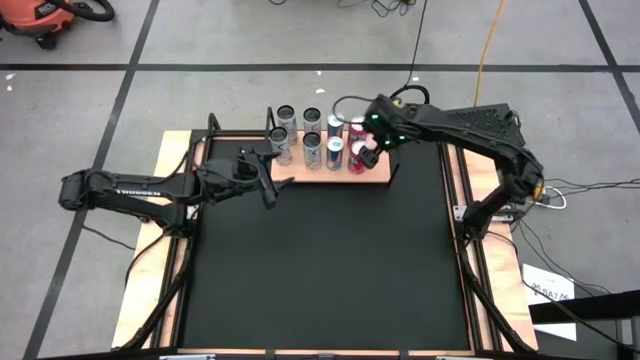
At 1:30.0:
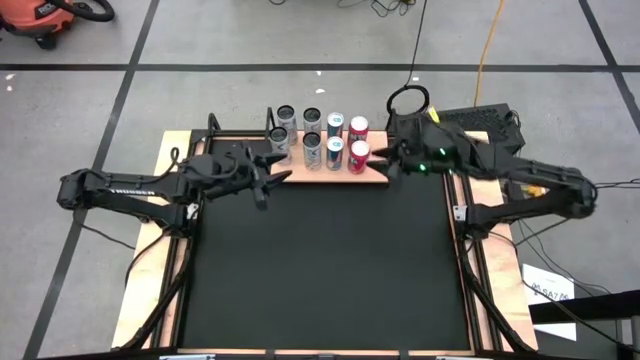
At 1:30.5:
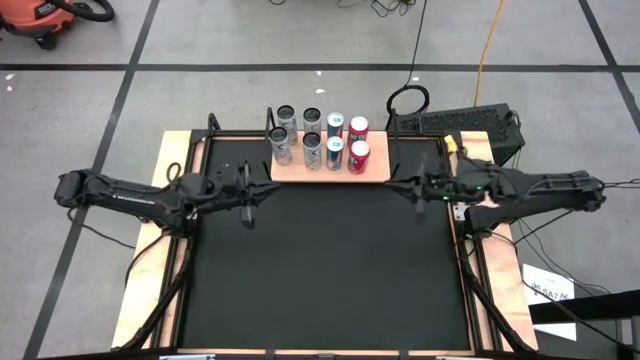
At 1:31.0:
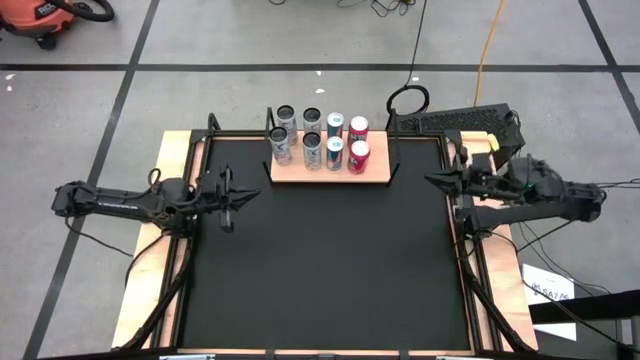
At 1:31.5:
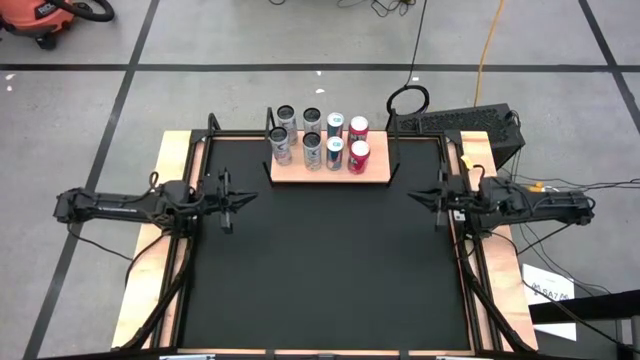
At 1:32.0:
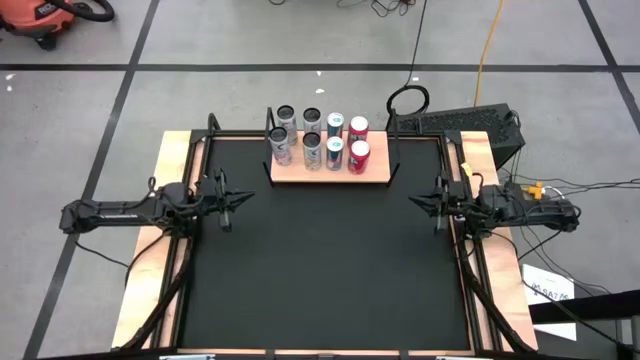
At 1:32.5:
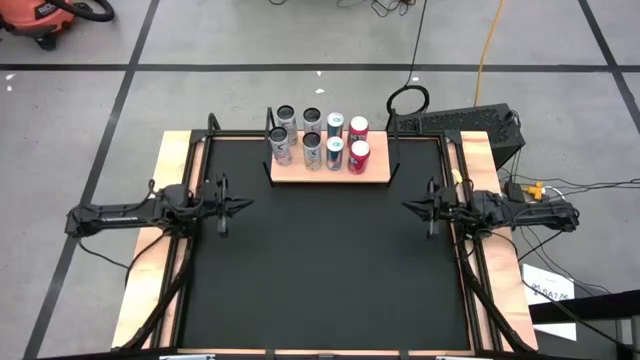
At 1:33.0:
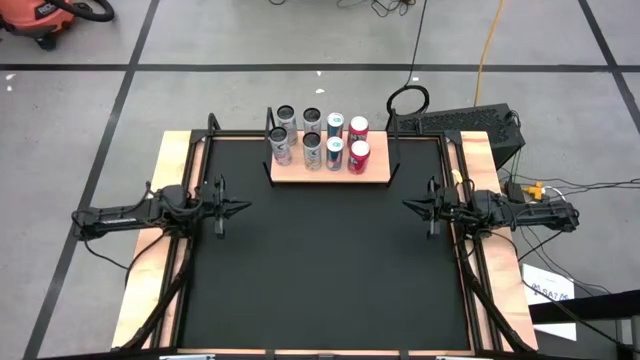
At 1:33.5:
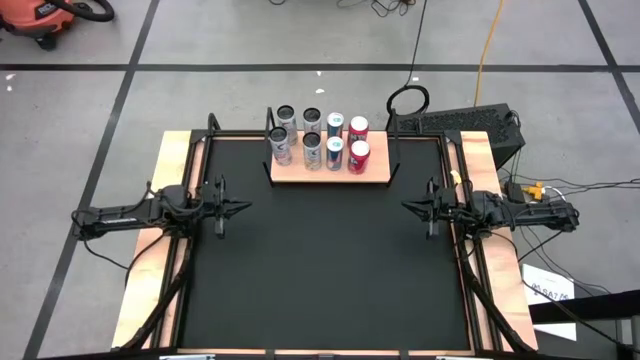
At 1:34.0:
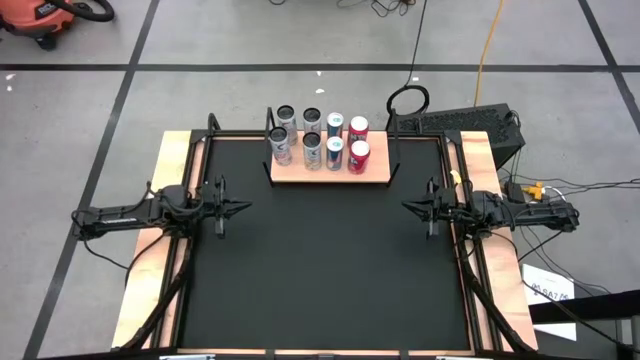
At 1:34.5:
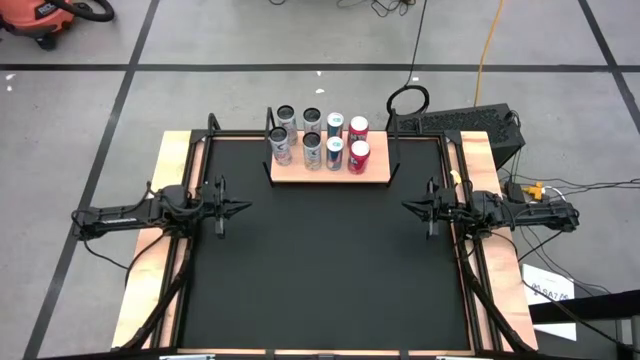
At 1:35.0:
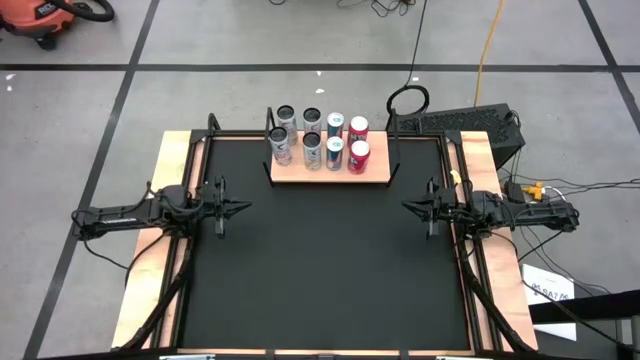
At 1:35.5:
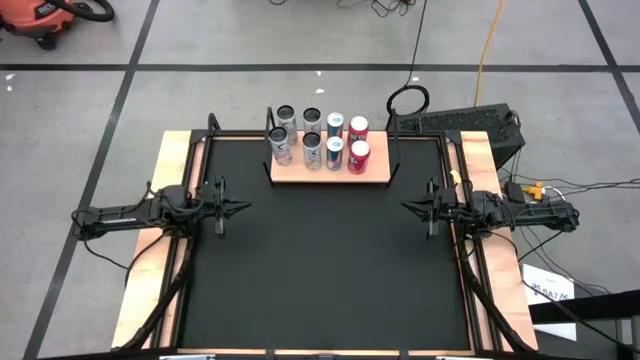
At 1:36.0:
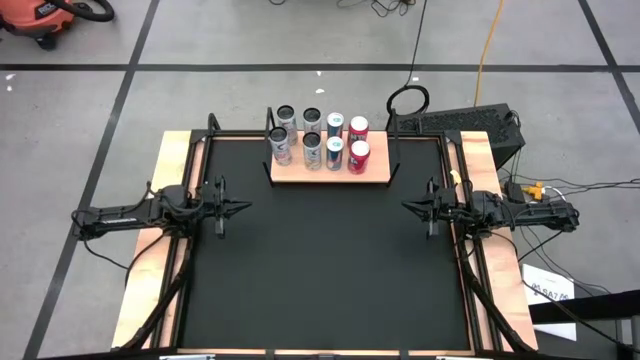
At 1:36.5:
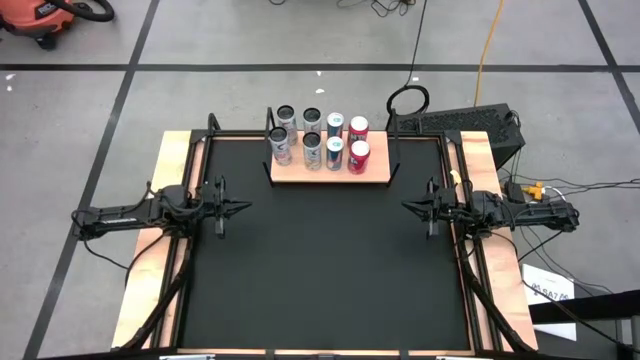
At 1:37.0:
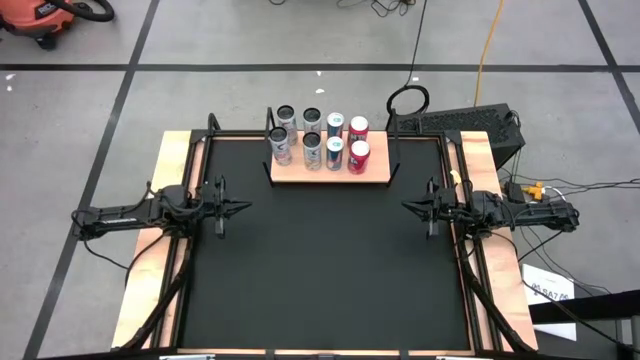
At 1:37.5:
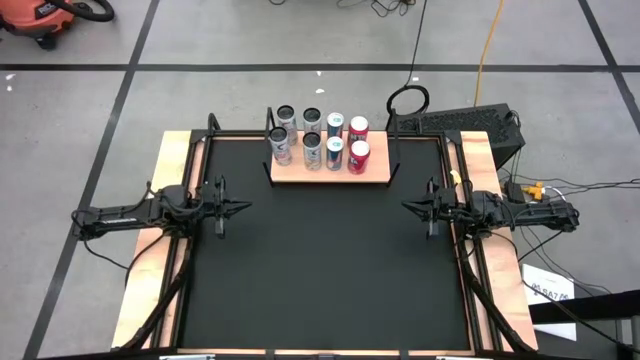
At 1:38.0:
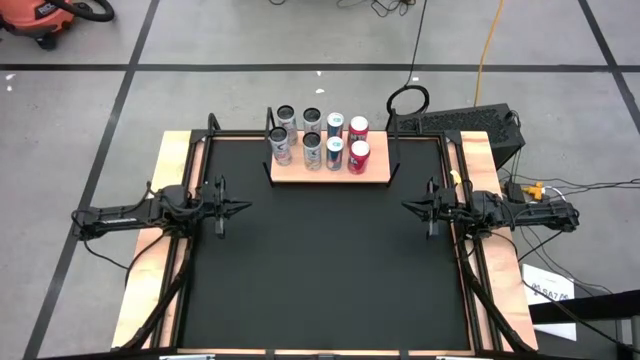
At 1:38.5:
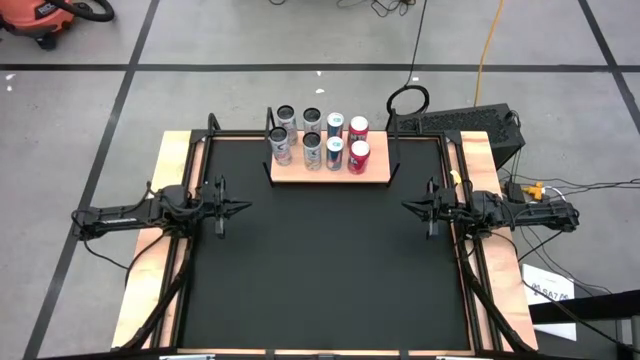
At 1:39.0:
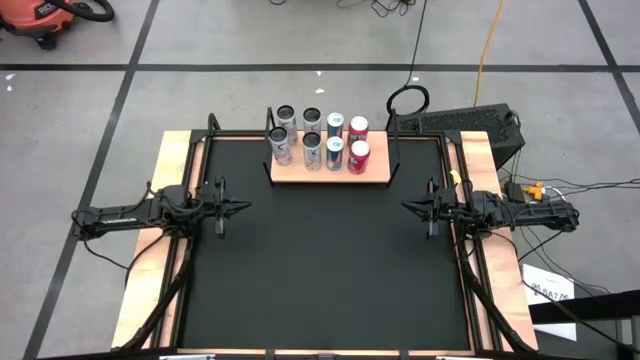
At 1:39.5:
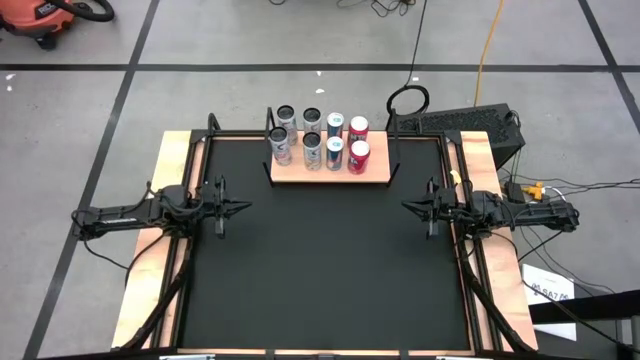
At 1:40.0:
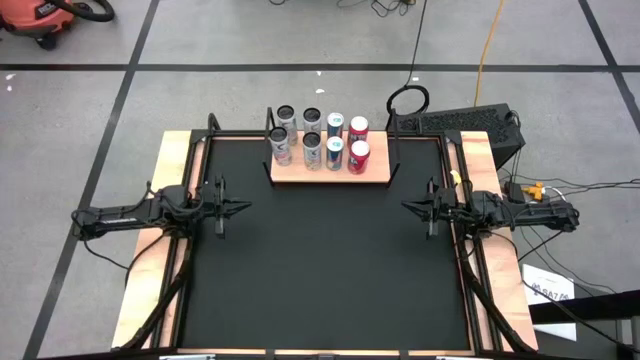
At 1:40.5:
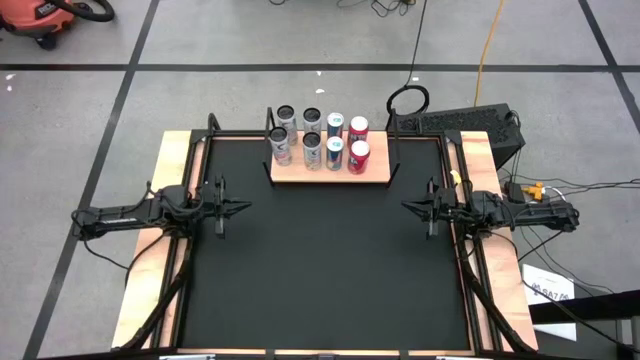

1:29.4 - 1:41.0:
Task: Place canned beverage on shelf
Return to Home Position

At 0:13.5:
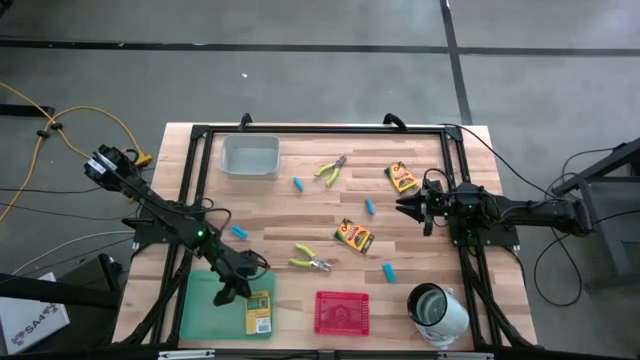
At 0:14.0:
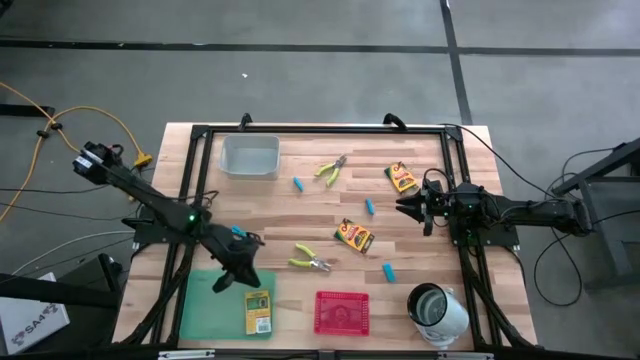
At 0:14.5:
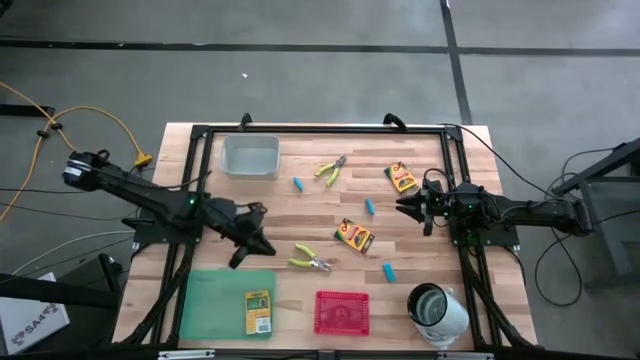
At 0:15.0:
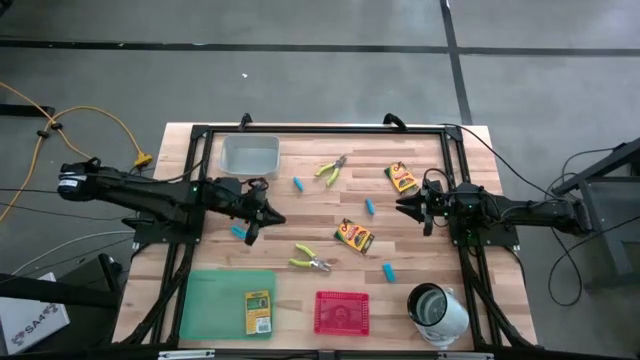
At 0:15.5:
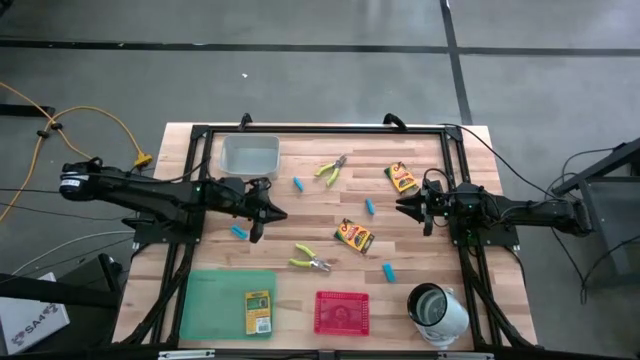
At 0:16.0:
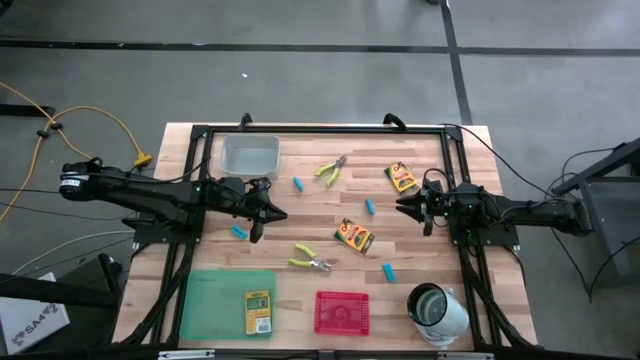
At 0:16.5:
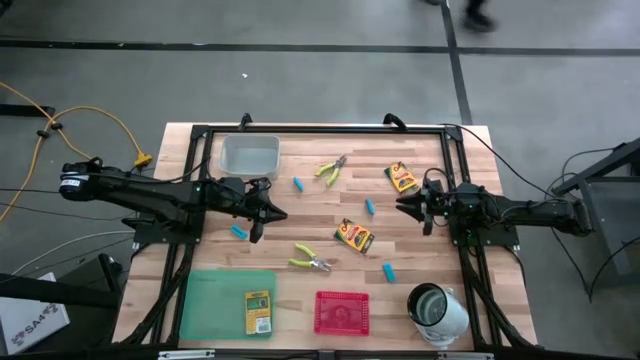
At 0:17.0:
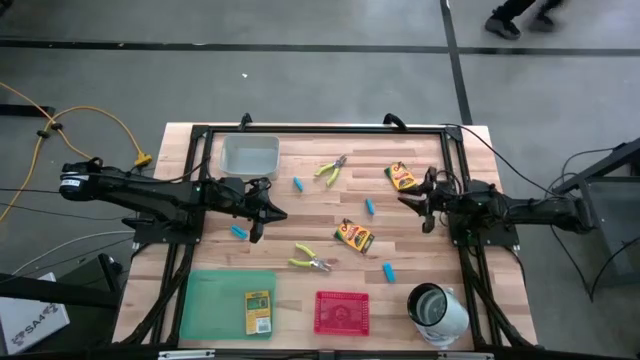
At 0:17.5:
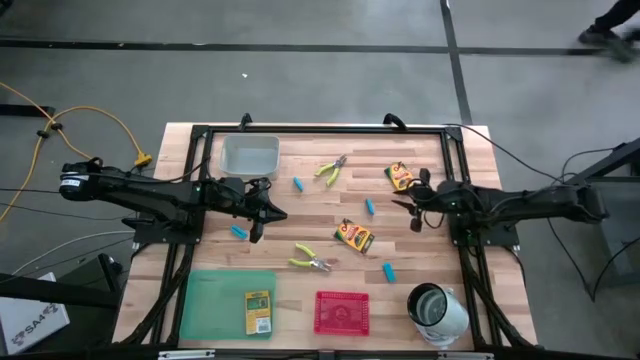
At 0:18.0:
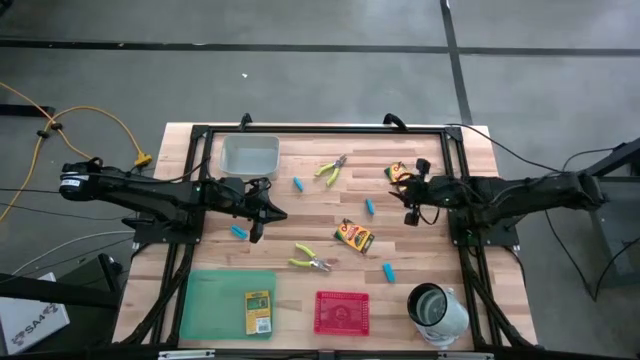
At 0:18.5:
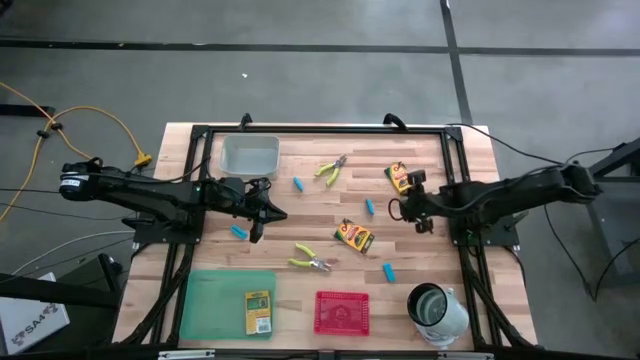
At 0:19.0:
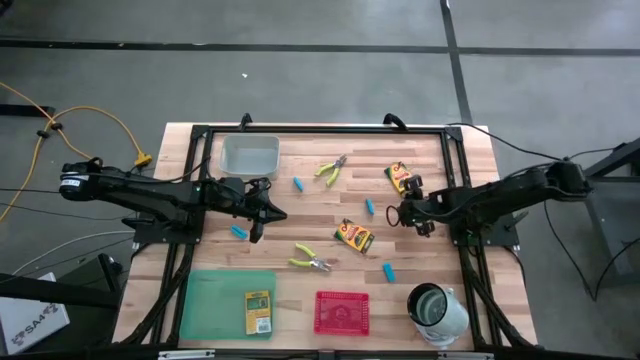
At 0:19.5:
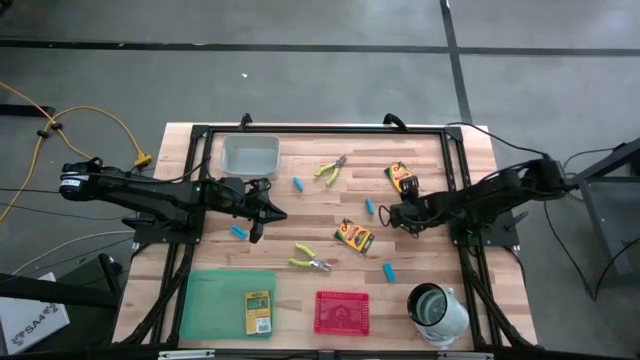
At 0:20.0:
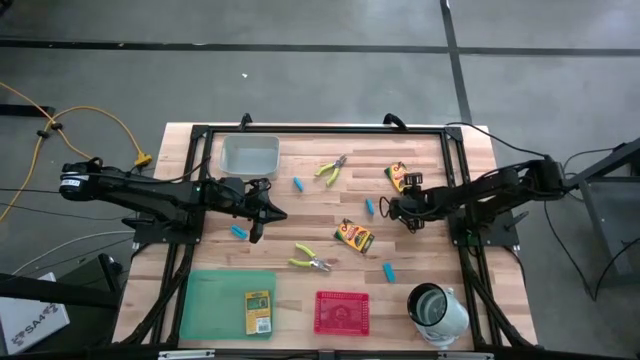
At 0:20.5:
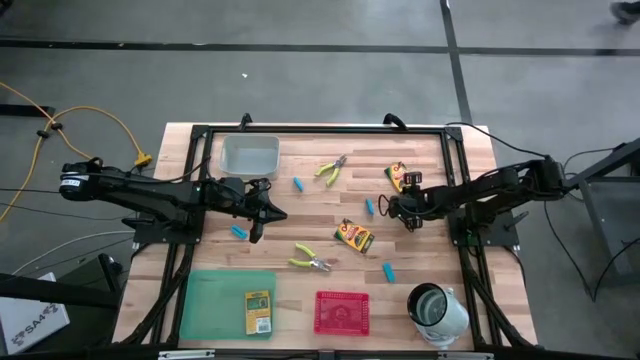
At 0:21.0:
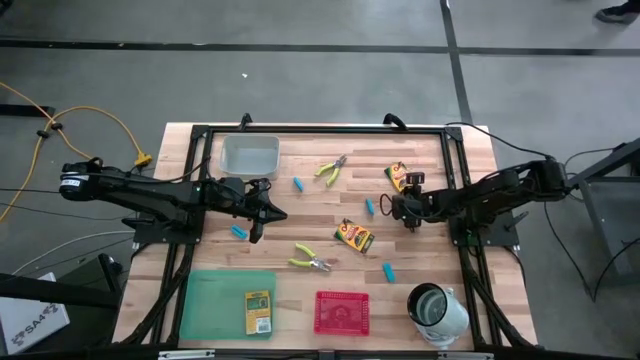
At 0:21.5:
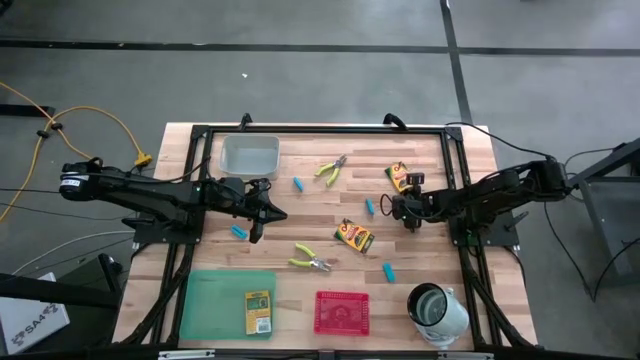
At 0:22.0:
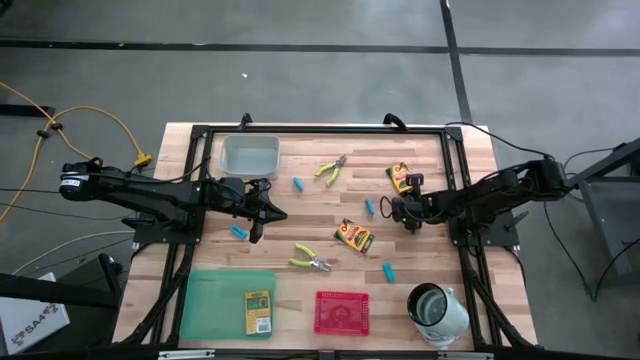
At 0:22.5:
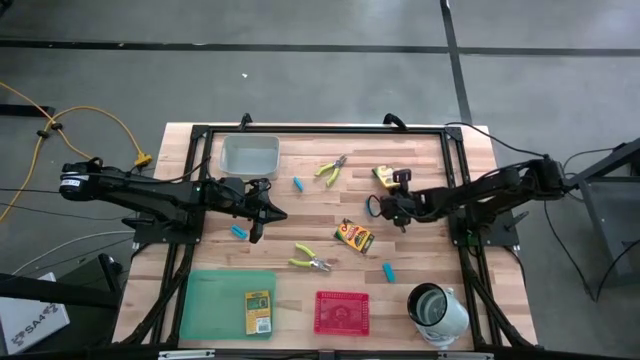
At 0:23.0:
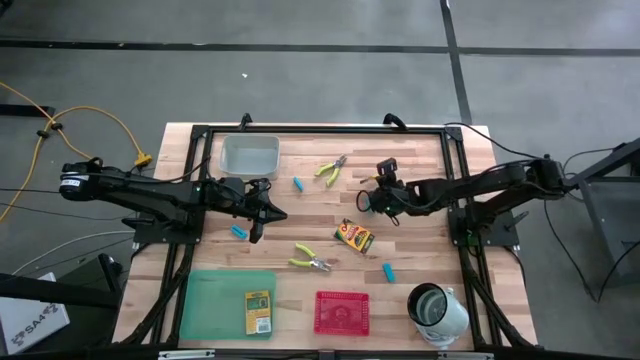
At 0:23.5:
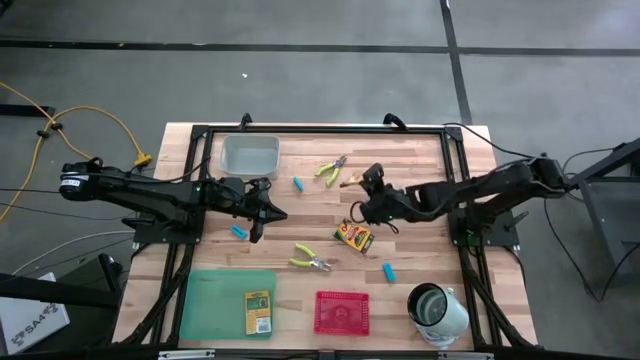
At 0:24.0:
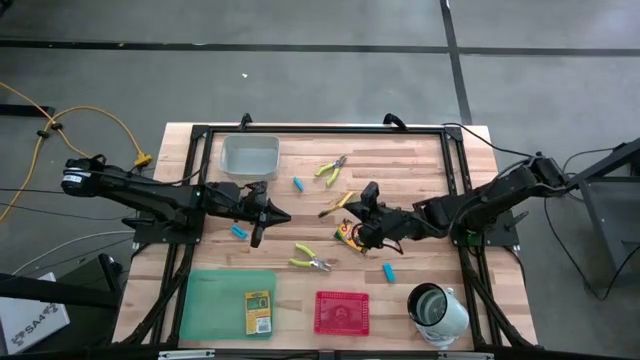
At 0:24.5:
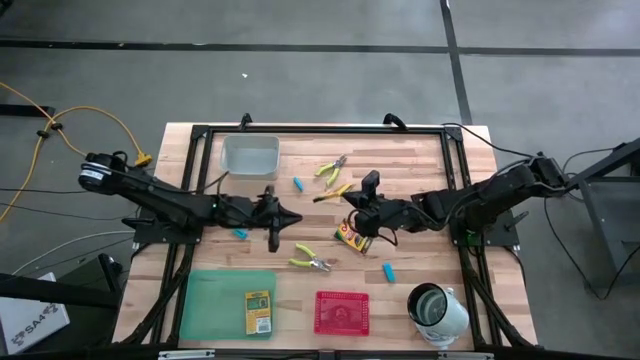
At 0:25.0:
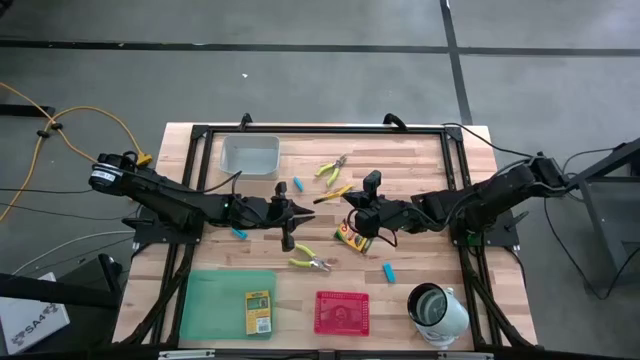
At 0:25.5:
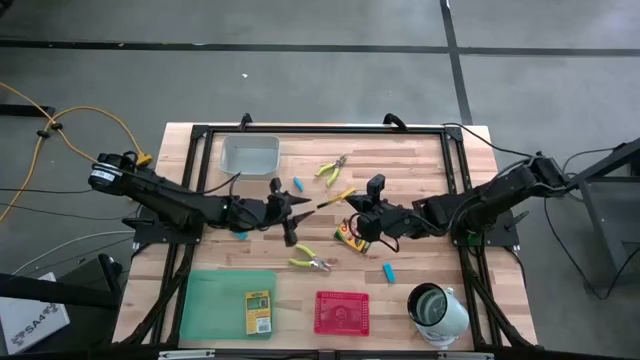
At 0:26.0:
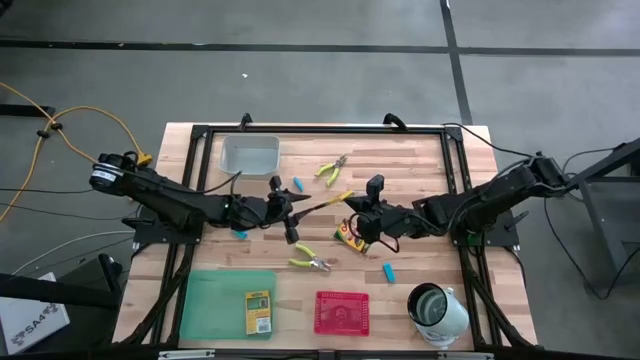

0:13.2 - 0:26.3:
Task: Pick & Place School Supplies
Put the yellow crayon box into the green bin
